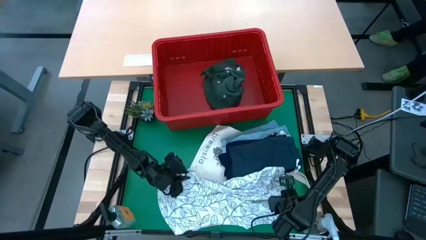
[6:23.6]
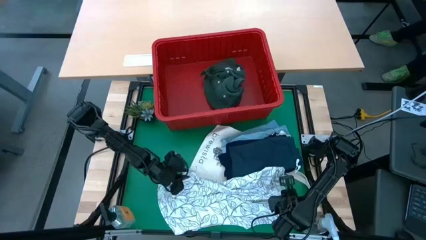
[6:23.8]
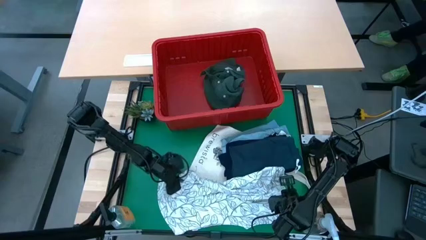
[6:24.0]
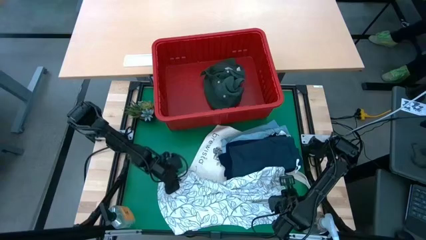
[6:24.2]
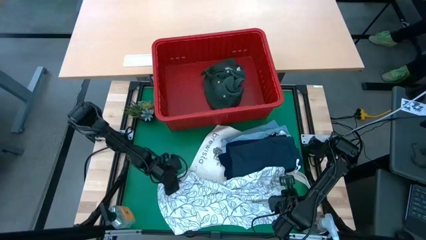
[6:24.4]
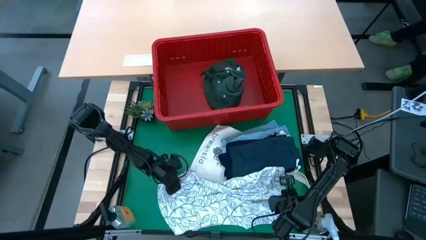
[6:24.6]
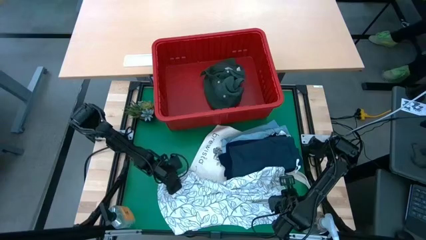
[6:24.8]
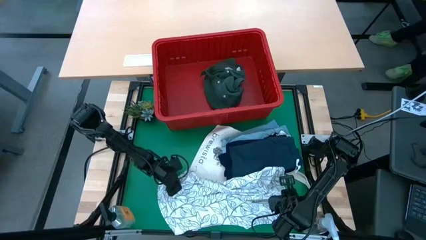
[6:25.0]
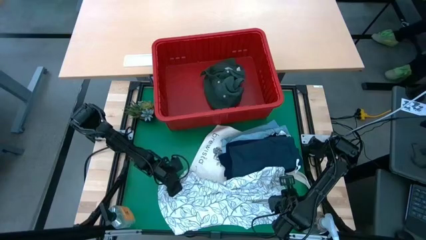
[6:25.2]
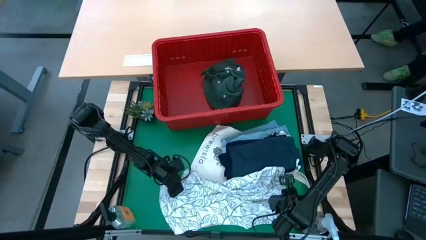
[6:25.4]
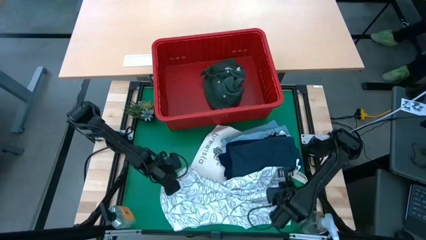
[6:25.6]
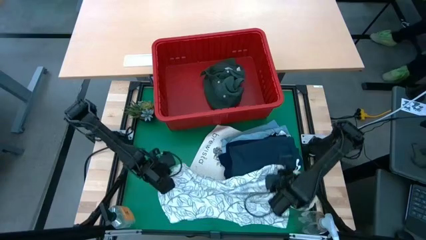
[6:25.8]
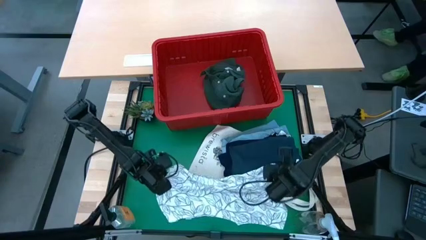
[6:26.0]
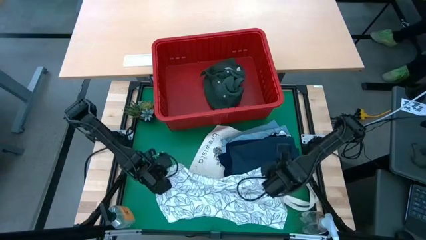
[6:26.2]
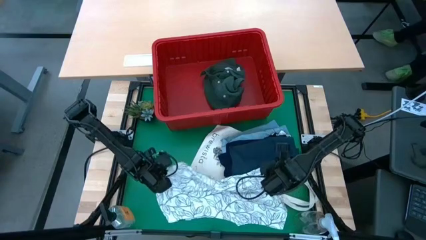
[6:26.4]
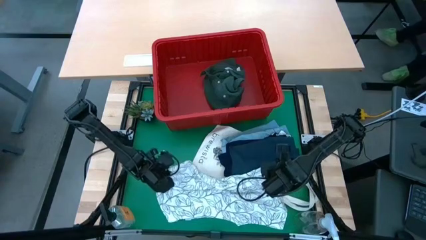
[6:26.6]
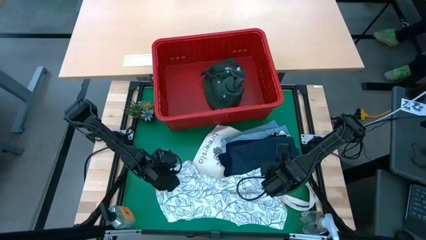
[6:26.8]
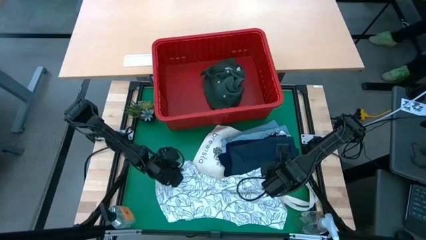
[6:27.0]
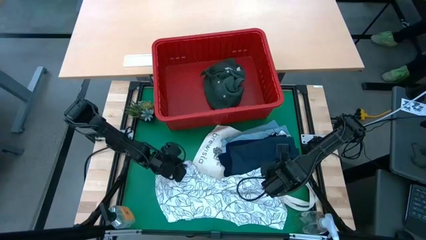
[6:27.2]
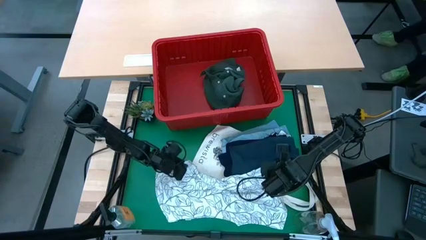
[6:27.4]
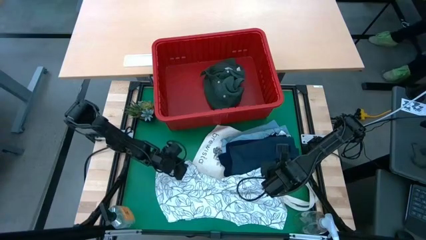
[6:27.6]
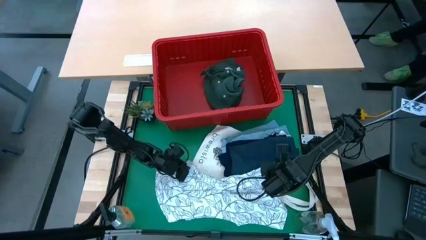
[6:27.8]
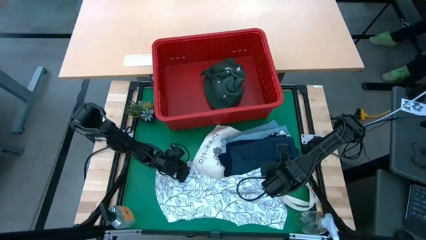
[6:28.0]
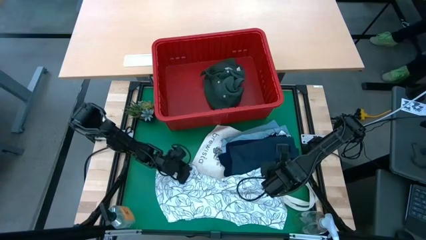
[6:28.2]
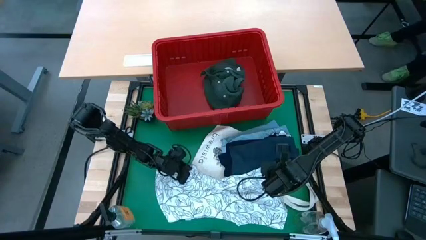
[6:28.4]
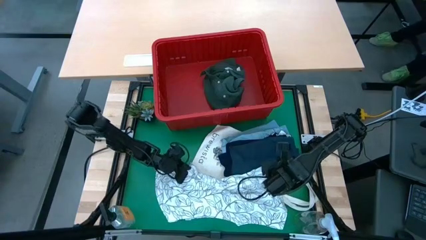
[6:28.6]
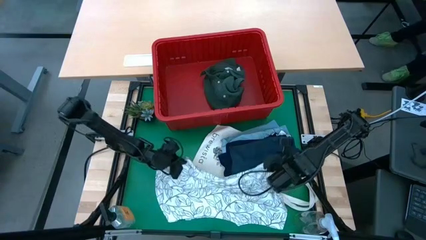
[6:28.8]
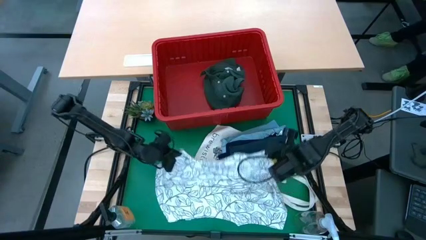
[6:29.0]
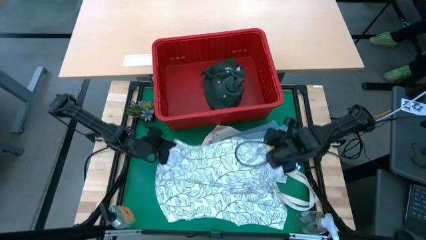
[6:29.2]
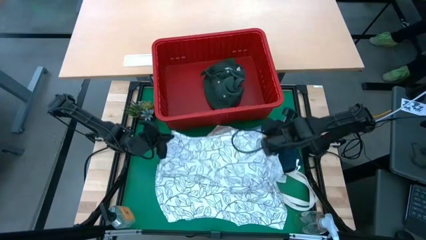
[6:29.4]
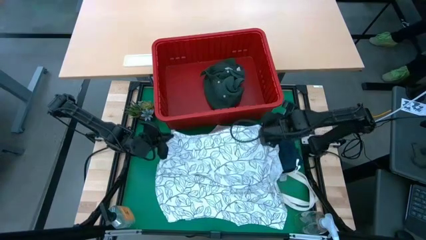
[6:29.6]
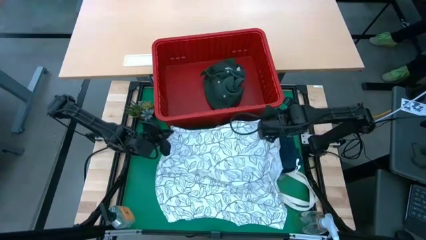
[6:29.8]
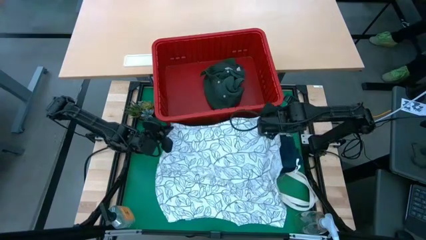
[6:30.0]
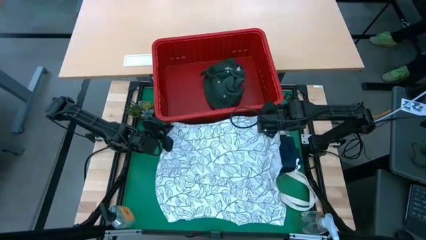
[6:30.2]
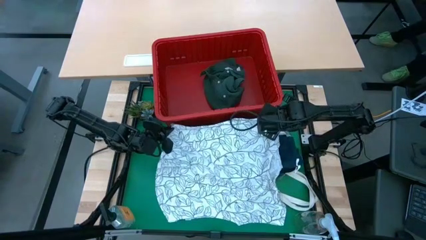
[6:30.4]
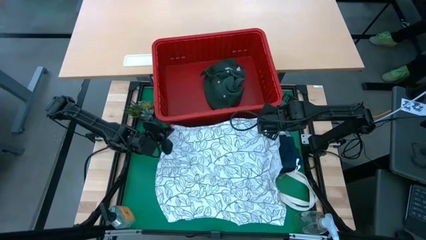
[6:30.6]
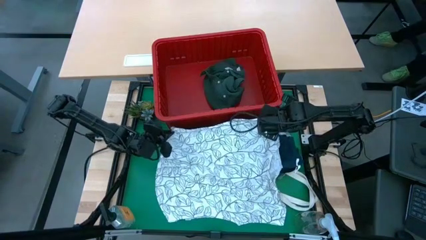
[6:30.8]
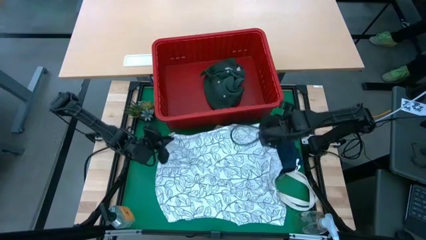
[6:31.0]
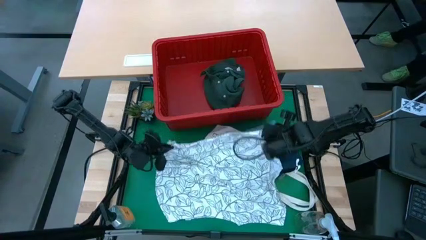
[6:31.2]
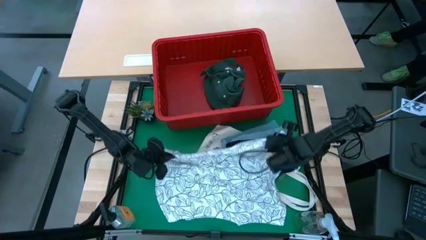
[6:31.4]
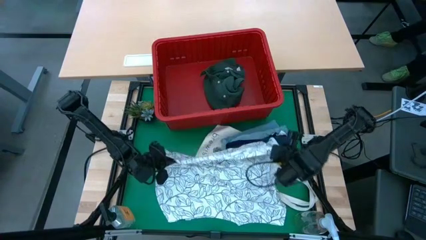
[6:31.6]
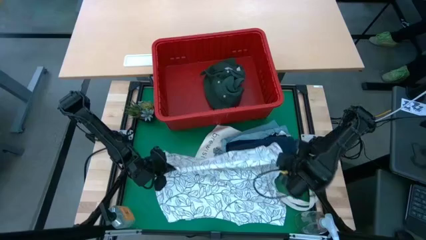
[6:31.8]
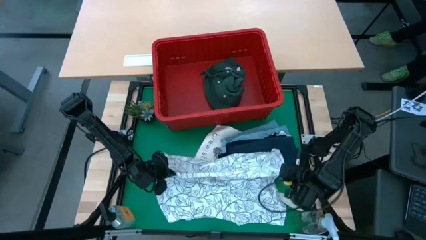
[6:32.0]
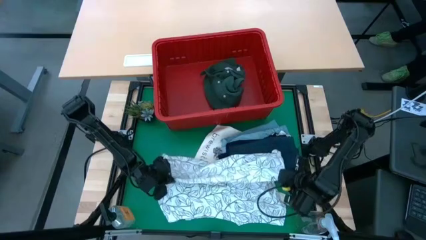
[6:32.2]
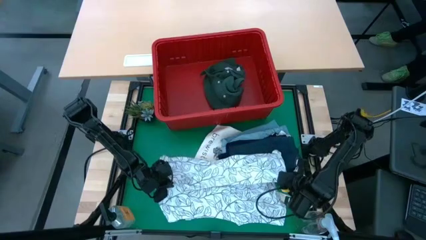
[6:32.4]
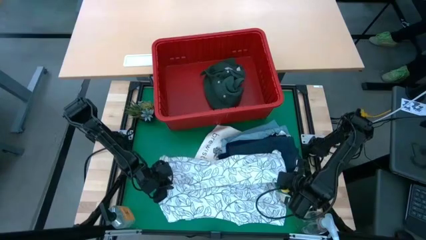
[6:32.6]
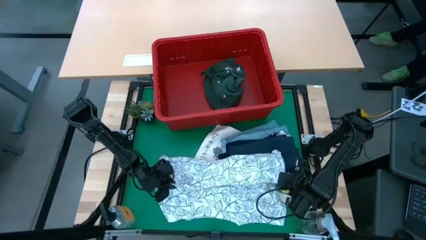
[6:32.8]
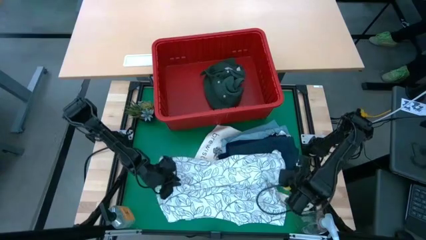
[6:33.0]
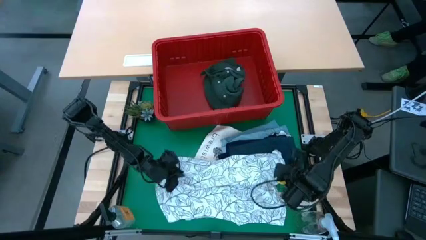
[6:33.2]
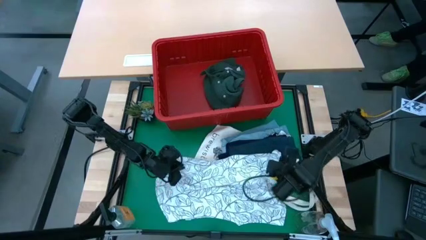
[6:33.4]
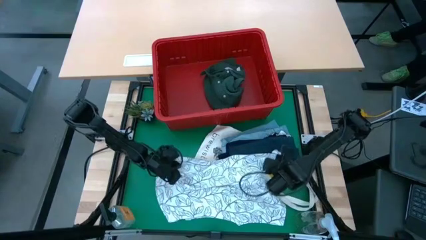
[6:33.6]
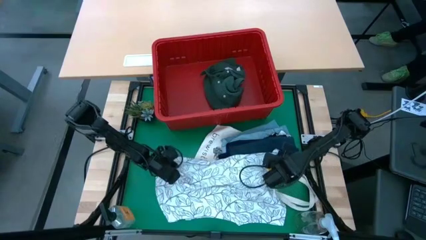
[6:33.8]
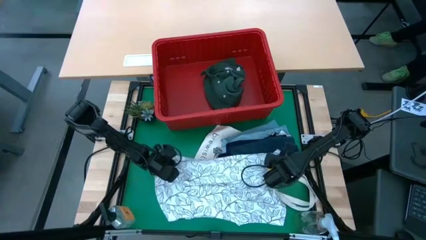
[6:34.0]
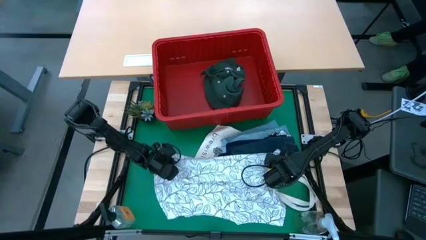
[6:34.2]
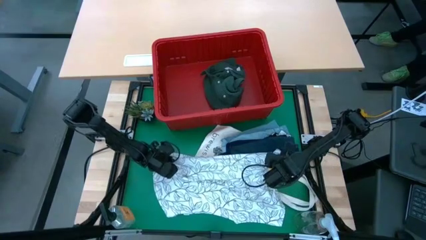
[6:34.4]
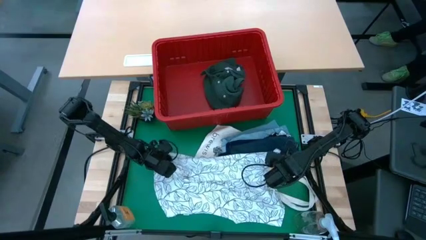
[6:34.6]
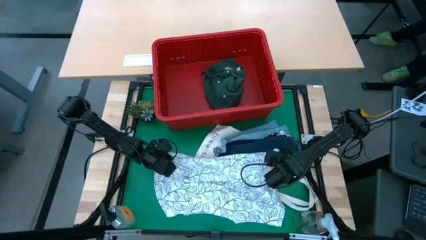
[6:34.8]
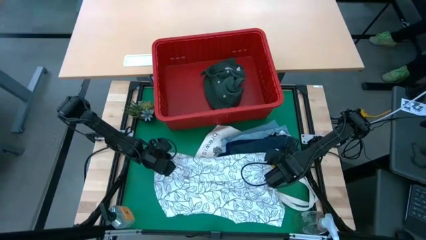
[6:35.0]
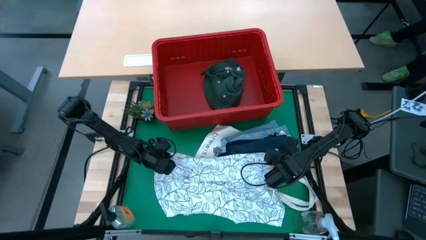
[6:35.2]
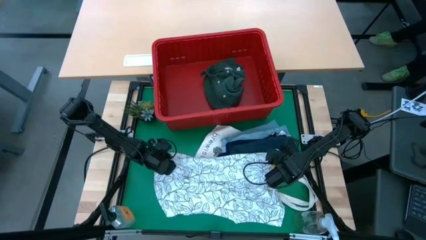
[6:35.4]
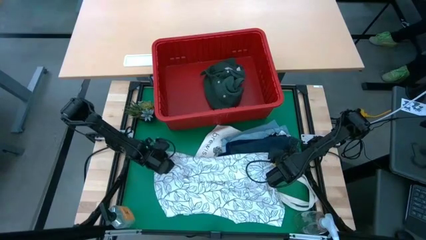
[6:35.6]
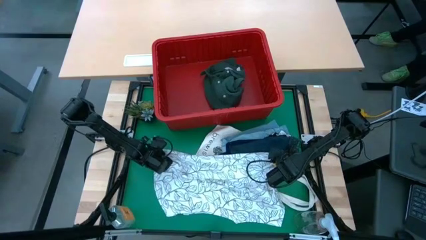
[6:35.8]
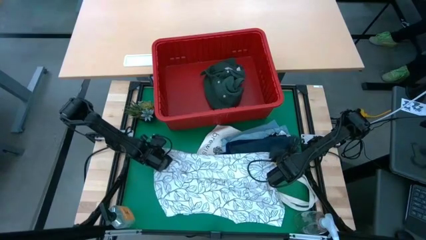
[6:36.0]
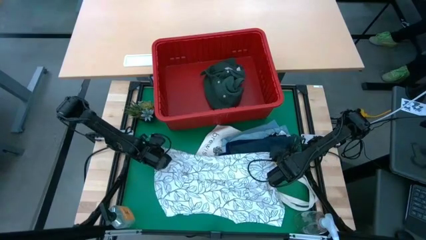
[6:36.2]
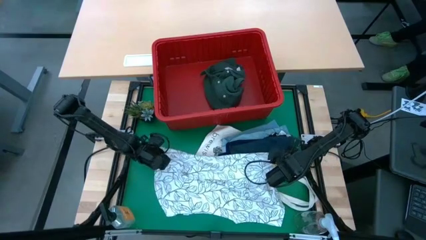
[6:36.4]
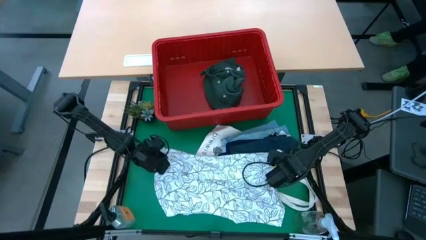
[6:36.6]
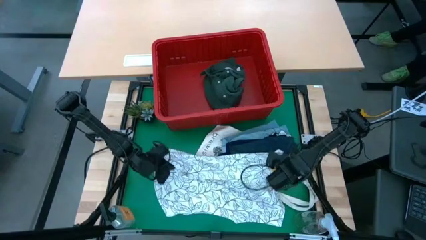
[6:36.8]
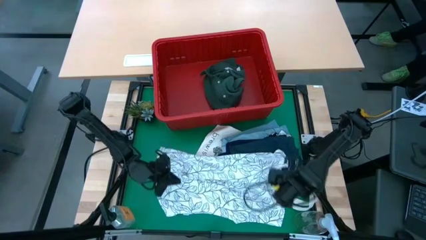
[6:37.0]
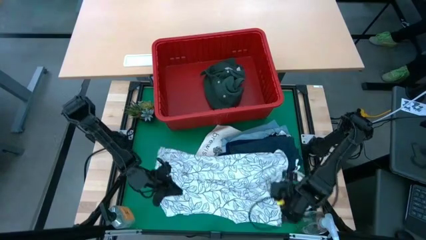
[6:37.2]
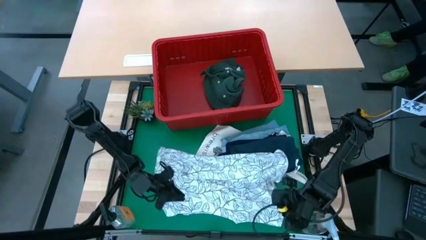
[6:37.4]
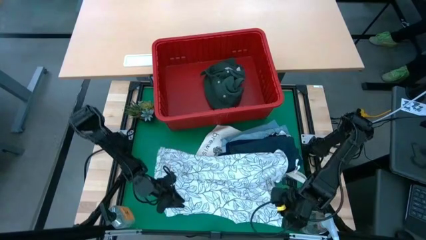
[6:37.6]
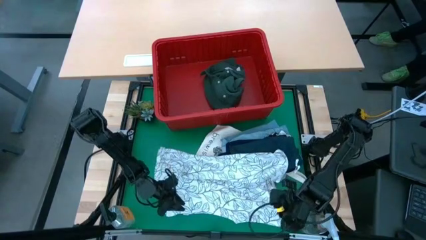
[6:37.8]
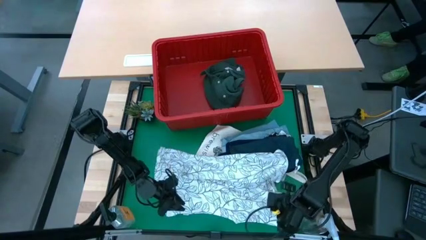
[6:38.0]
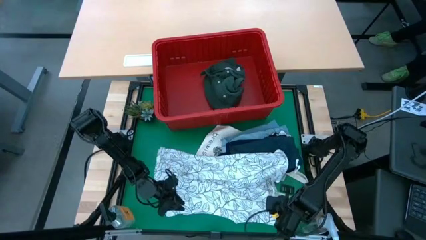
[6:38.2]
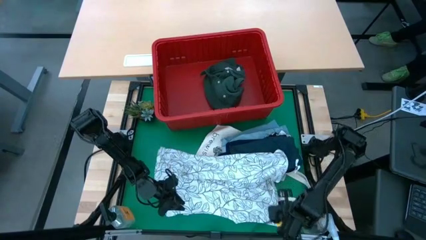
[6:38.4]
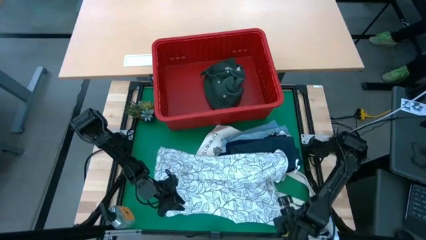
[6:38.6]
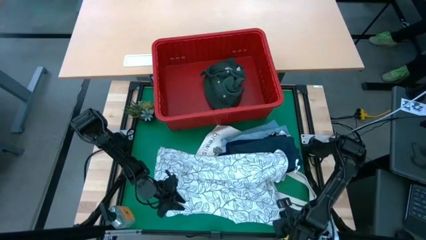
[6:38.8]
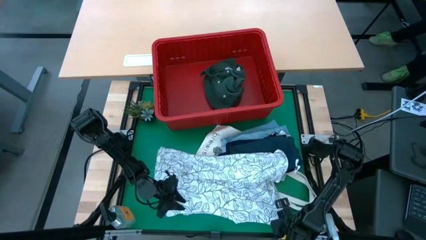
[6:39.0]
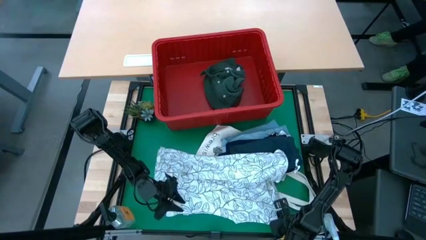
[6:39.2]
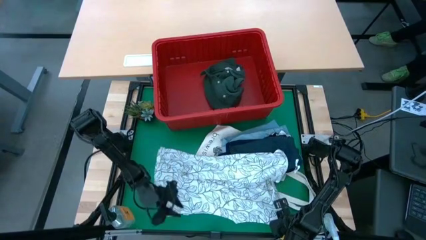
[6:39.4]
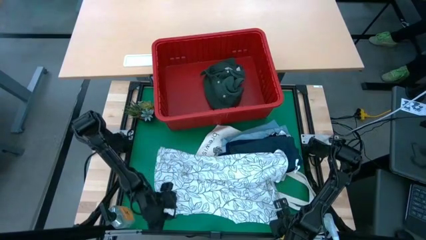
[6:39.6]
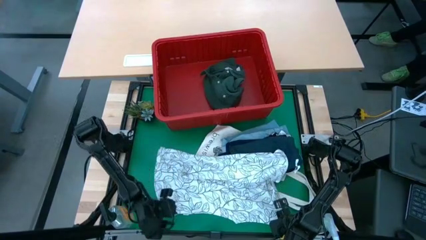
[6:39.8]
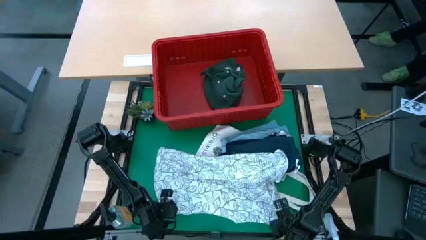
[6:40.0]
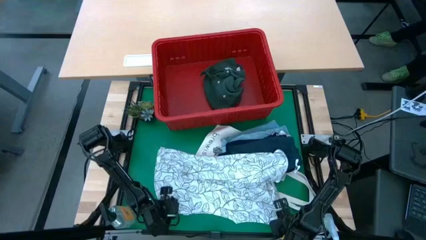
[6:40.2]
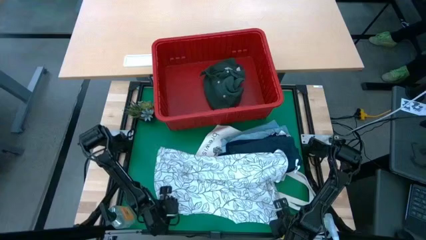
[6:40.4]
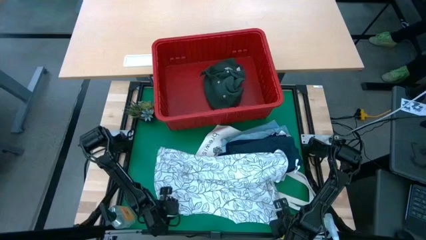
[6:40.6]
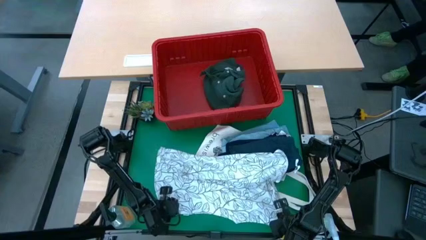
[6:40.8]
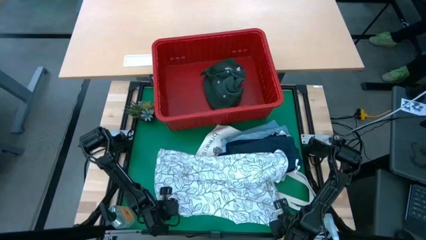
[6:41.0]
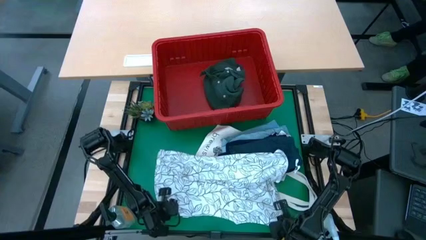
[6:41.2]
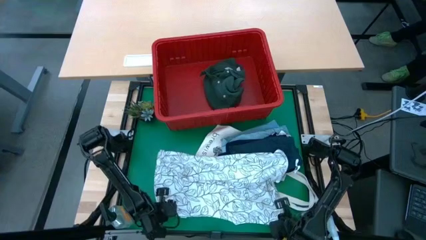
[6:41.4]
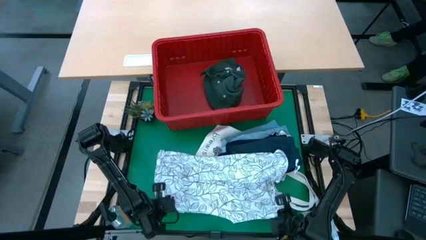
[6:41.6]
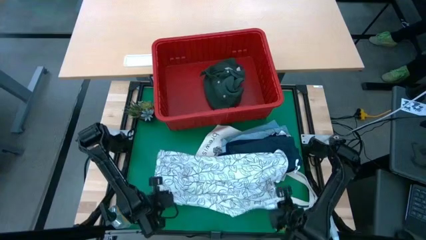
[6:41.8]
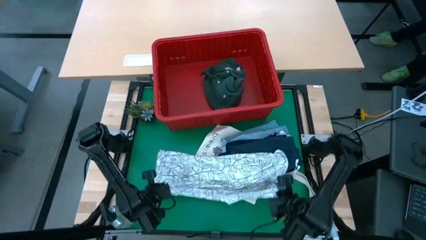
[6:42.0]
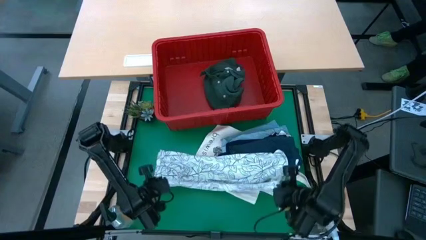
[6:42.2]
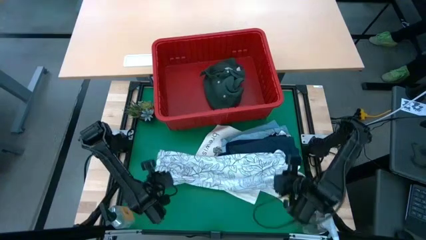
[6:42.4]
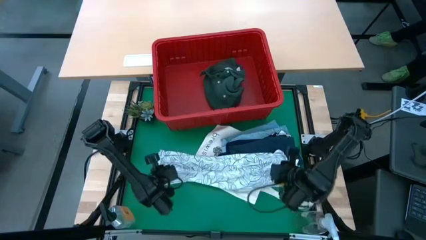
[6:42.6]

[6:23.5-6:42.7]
Task: Fold laundry
Fold the patterned white shirt
